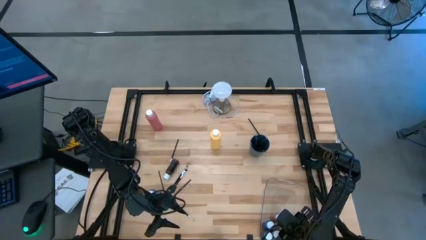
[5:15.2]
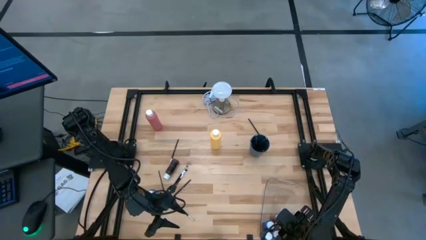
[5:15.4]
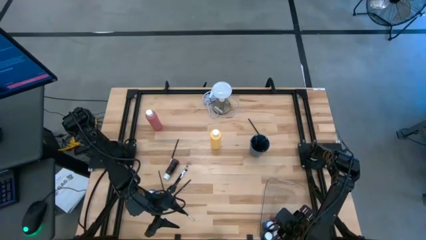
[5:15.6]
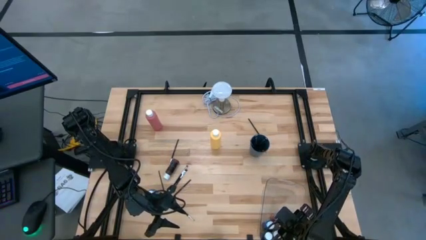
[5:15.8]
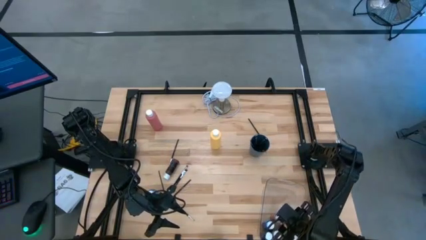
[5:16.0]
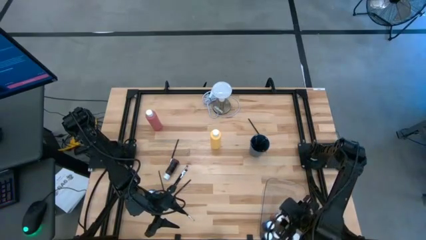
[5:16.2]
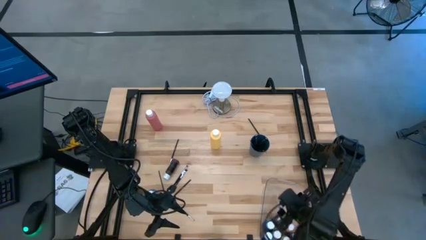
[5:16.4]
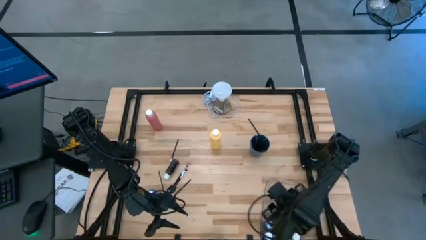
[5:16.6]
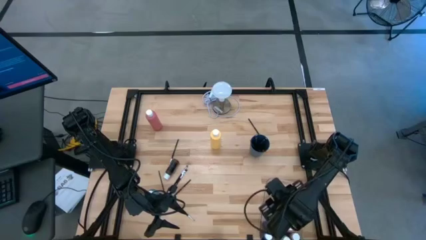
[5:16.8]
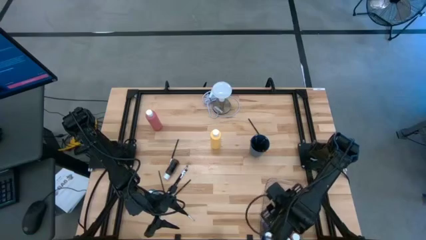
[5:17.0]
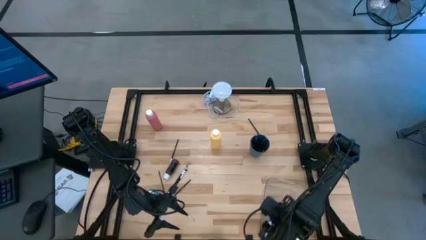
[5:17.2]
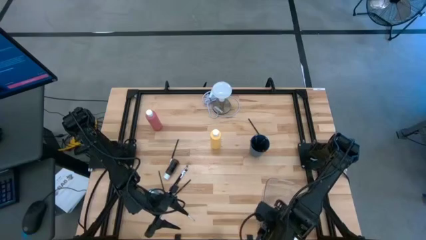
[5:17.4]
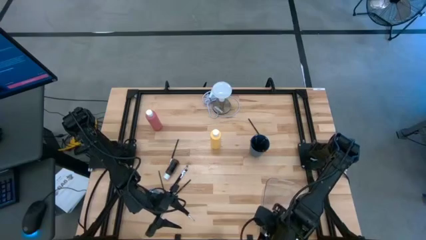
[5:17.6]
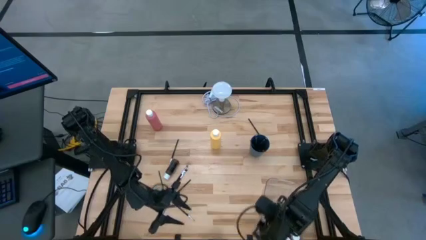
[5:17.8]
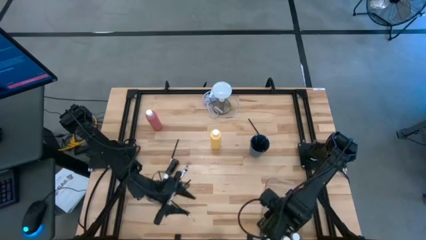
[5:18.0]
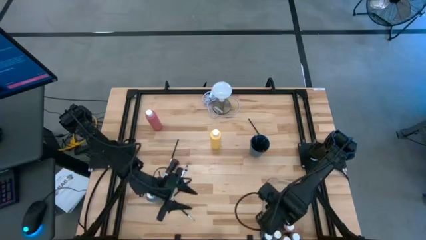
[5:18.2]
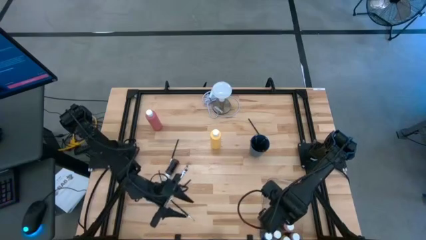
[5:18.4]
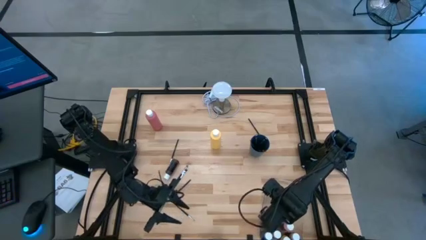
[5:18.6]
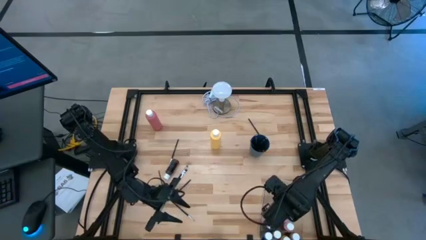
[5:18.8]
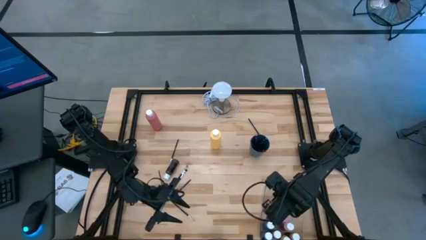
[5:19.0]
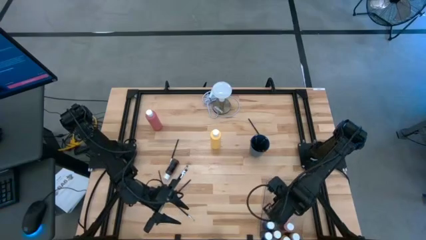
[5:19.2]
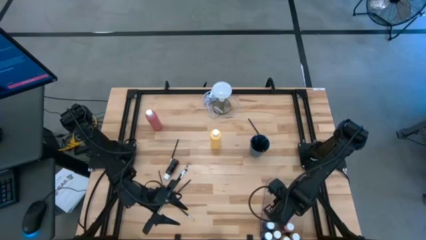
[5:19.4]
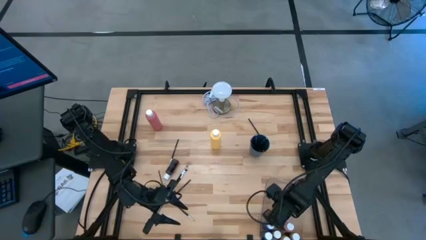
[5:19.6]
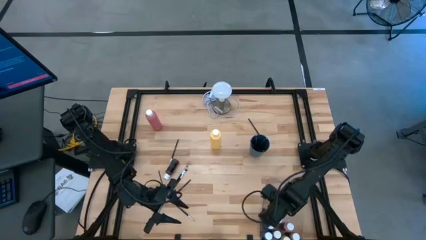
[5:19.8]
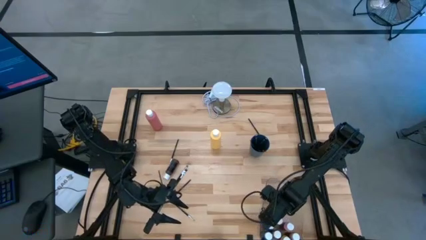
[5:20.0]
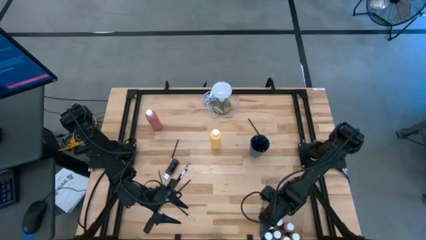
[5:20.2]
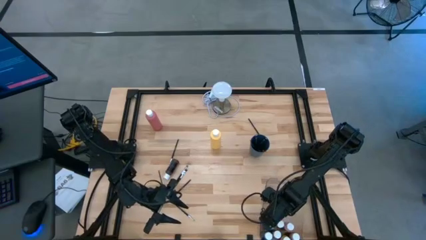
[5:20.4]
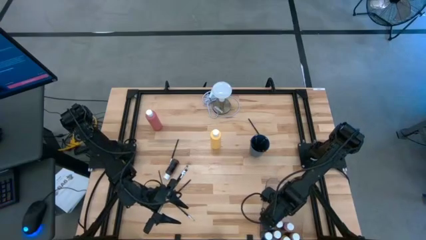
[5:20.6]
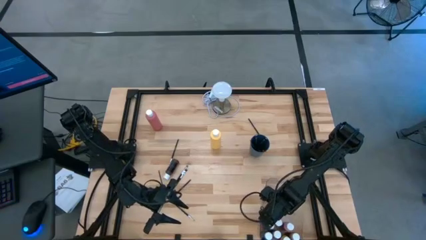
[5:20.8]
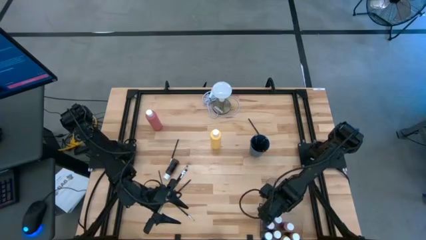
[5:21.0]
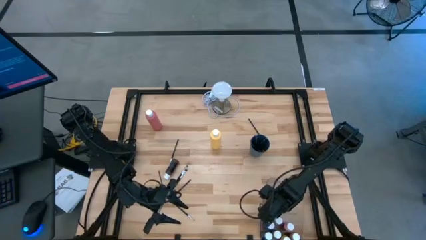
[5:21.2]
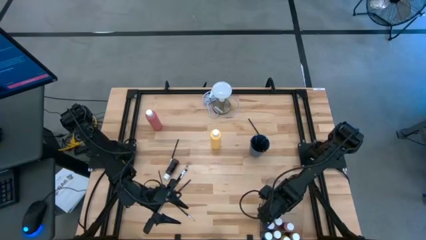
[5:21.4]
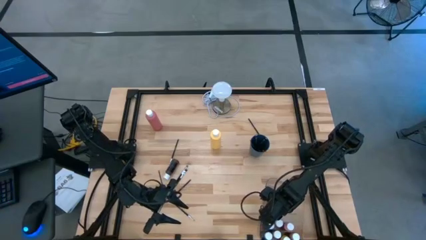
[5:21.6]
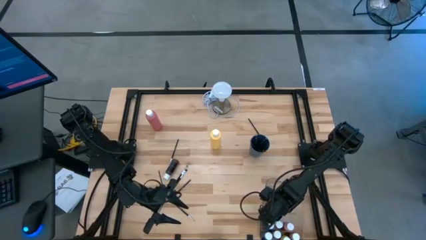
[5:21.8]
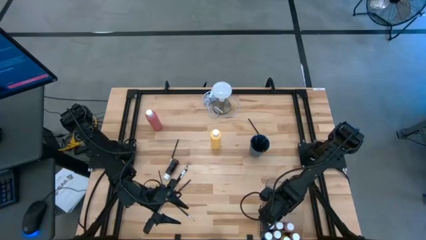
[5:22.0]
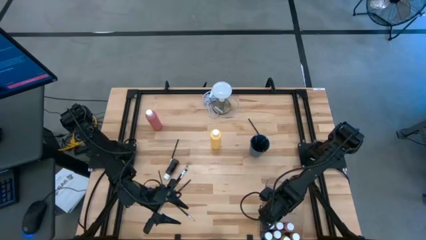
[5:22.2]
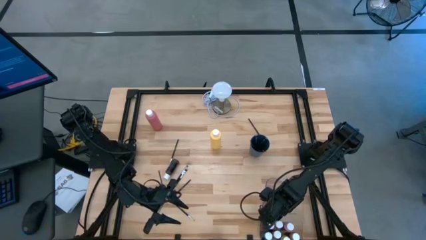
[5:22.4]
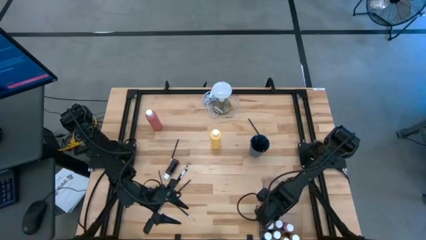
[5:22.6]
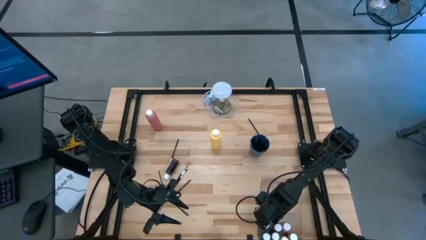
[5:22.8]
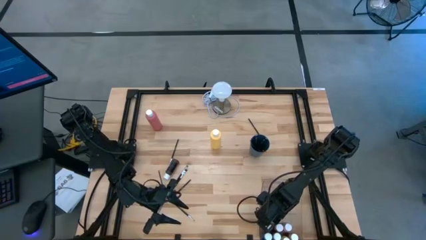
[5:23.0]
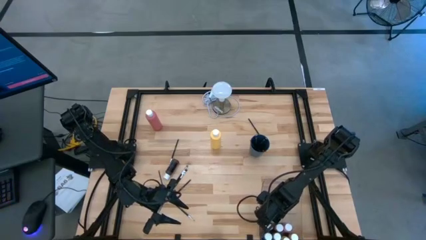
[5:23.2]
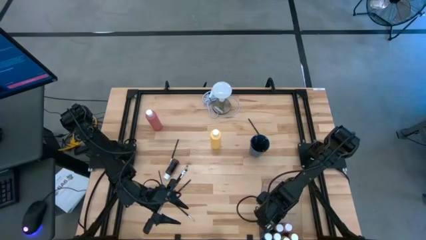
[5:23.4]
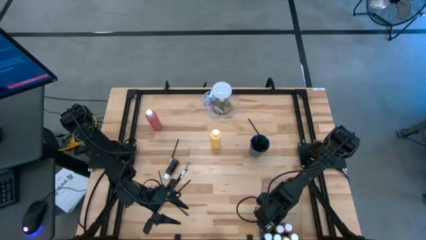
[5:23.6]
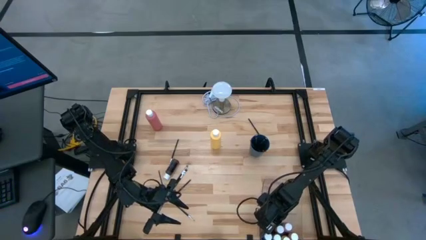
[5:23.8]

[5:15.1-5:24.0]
Task: Pick & Place Paint Supplies
Adjust the small brown paint bottle into the transparent bin

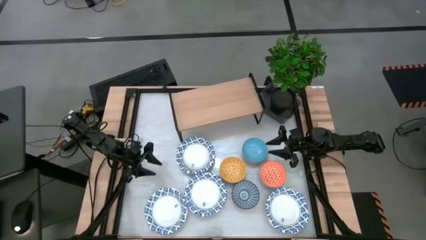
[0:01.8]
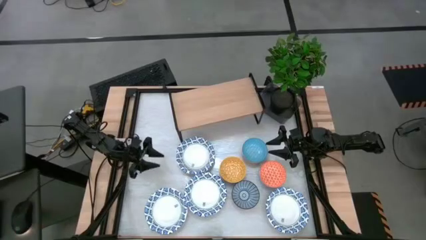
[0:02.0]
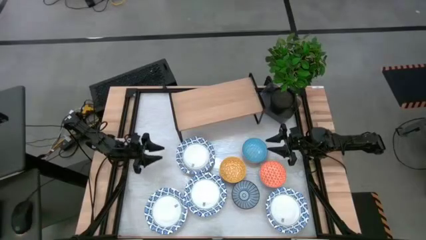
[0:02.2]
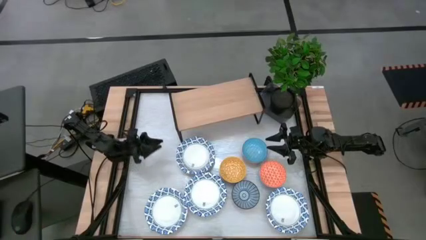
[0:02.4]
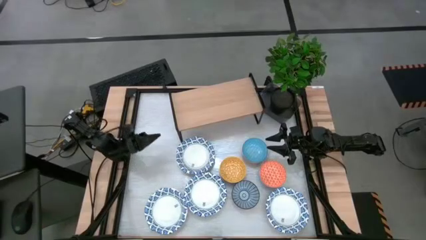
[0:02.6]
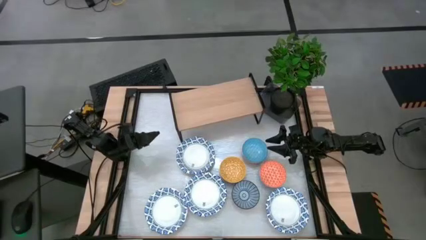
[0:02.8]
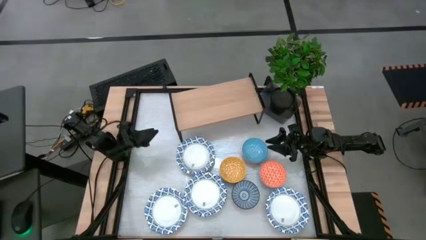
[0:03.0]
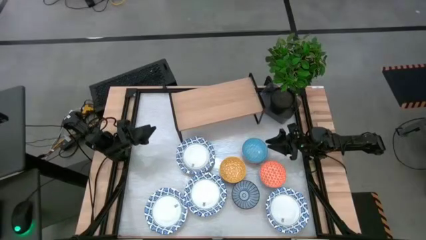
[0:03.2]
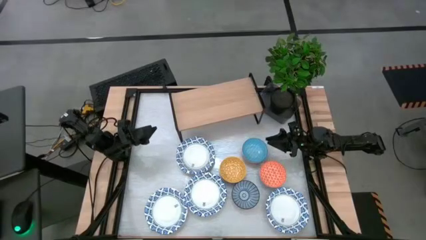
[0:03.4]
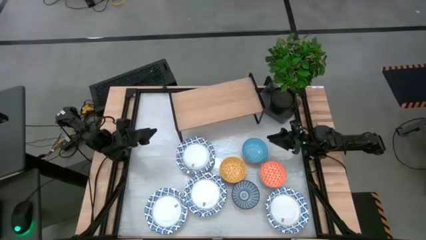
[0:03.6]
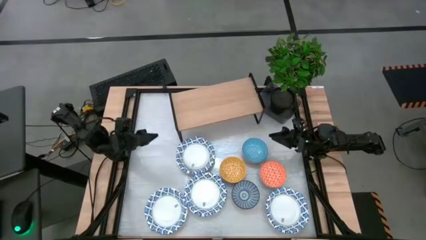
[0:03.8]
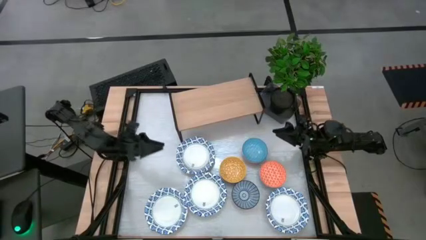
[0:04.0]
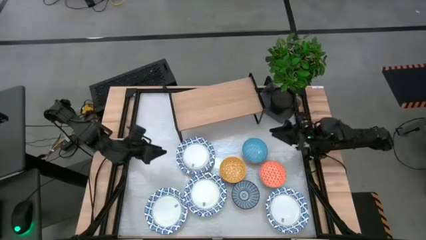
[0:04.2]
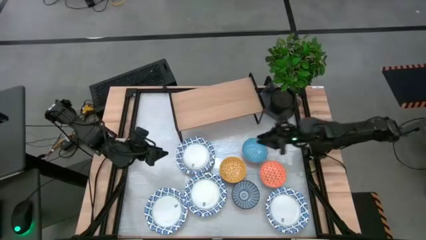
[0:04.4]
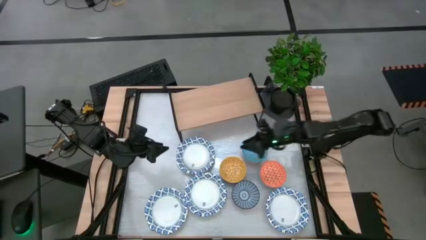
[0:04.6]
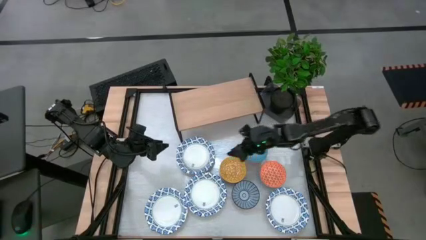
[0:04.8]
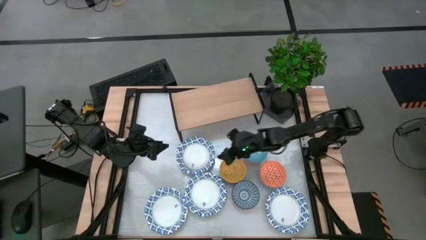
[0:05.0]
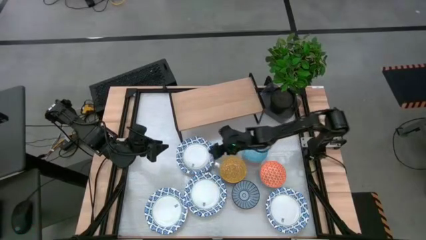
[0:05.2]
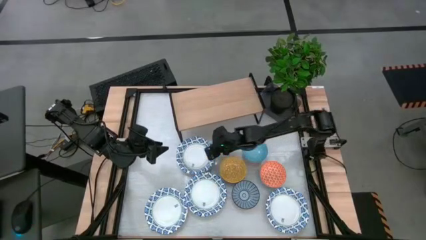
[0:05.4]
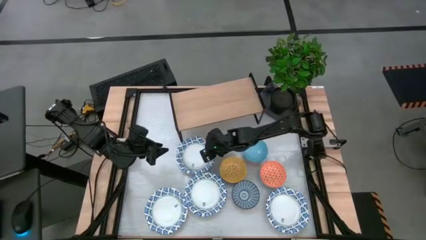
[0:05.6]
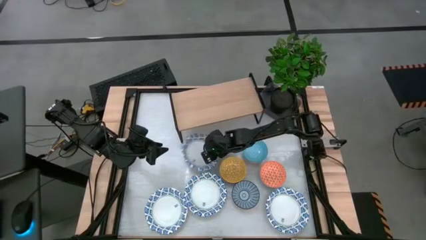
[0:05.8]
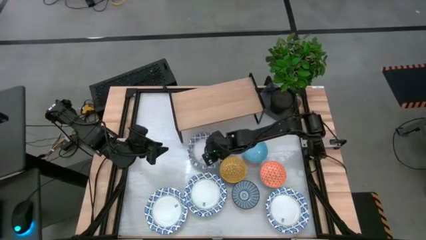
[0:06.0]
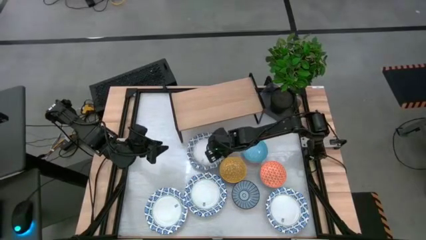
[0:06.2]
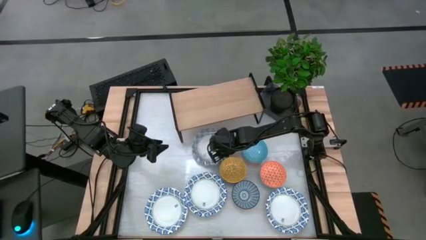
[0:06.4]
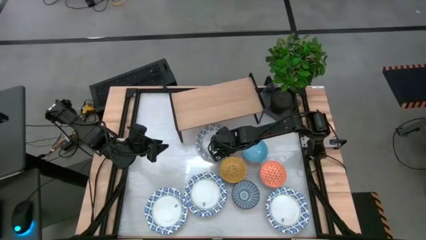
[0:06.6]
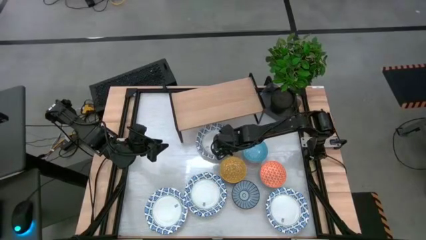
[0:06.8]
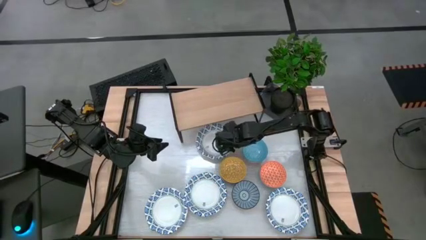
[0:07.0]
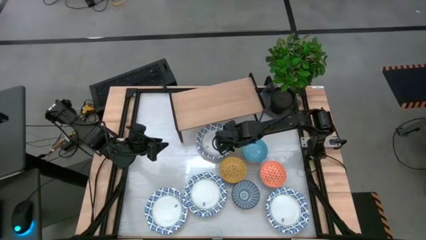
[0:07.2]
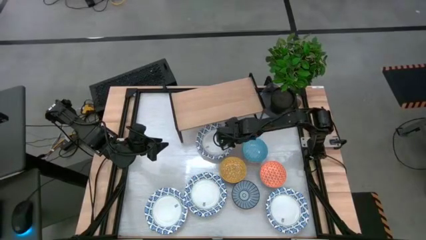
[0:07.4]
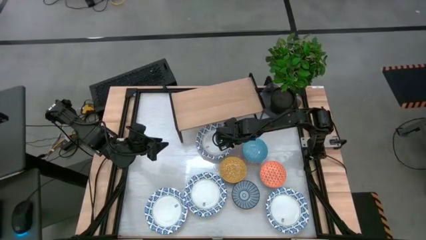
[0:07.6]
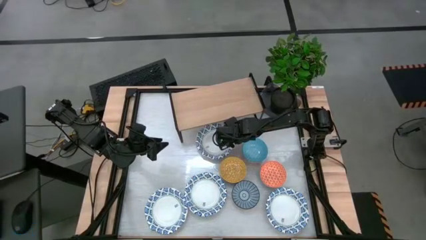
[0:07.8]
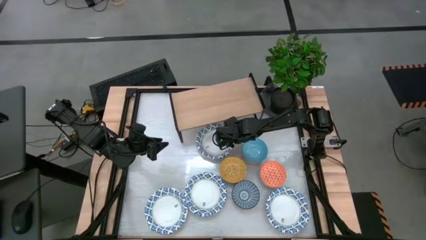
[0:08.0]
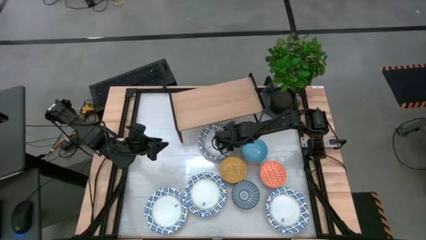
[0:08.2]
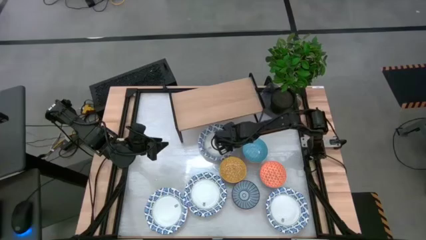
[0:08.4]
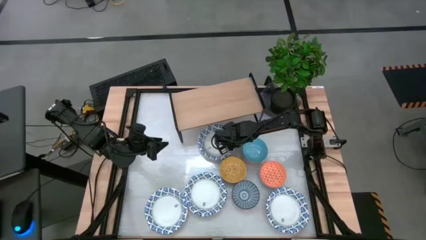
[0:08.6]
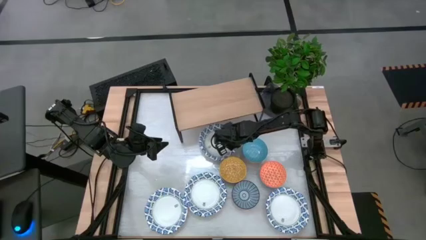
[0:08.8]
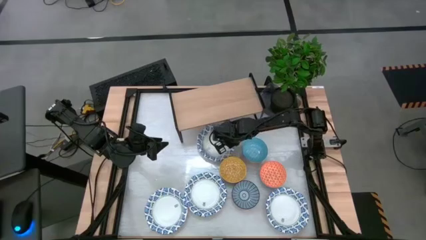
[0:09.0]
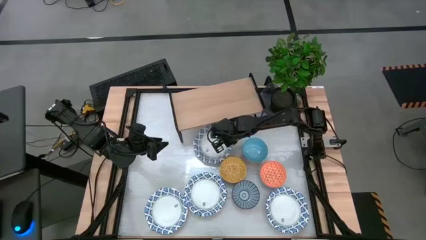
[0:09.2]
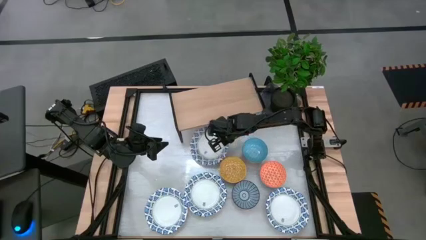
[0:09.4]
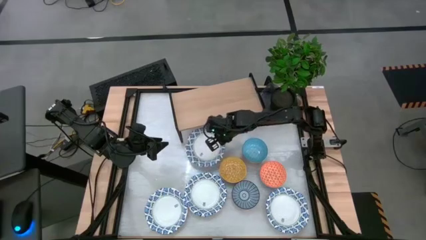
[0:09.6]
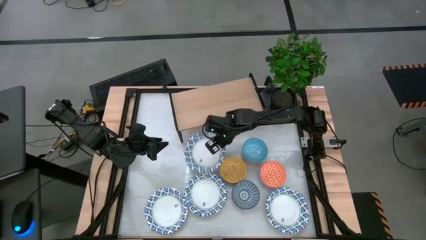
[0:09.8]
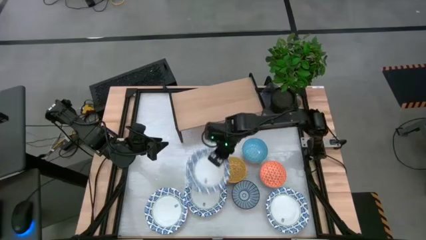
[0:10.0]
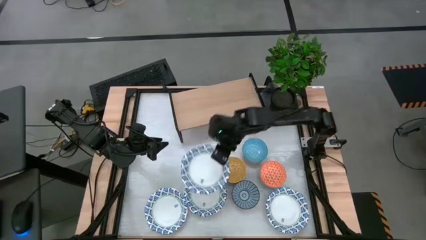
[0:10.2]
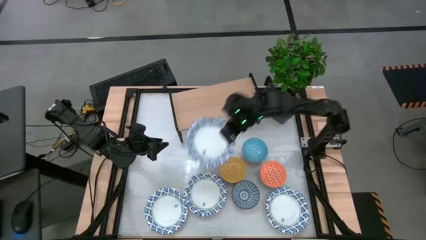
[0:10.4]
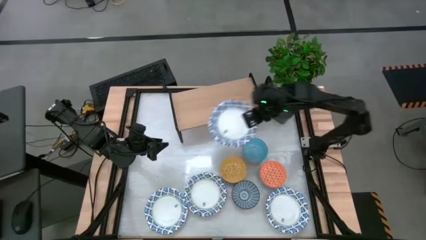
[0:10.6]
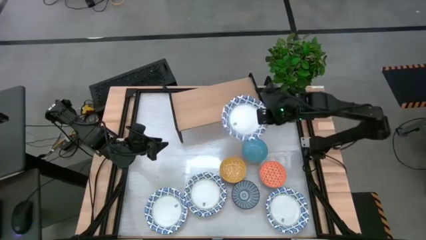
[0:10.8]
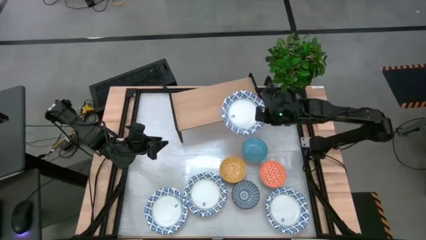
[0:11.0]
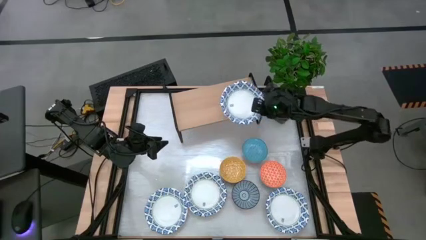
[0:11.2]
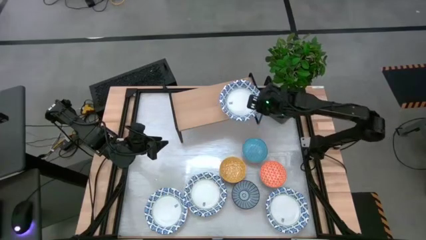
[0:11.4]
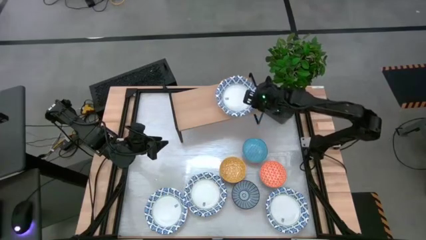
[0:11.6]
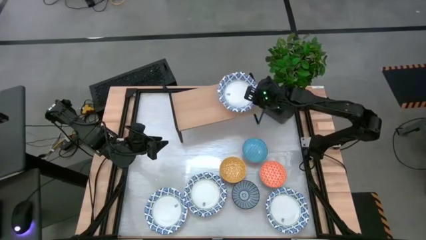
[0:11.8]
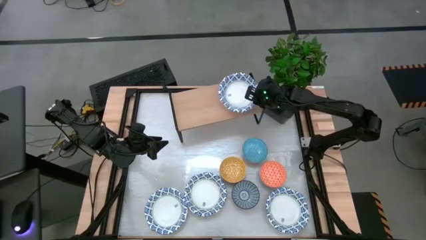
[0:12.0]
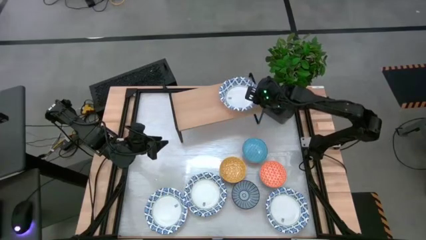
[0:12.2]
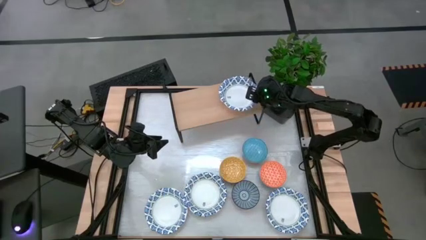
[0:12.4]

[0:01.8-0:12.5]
Task: Place and stack bowls onto a shelf
Put the white patterned bowl on the shelf
